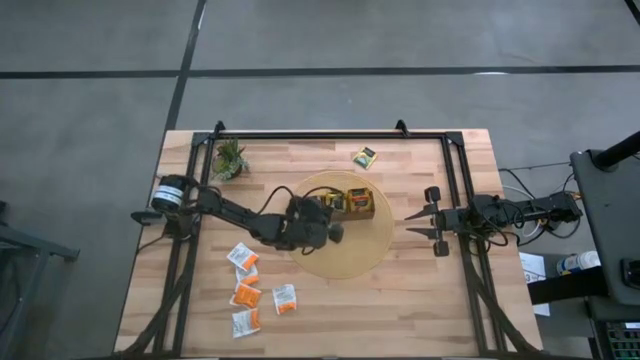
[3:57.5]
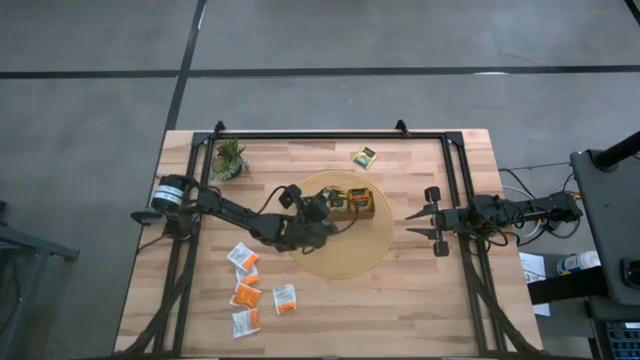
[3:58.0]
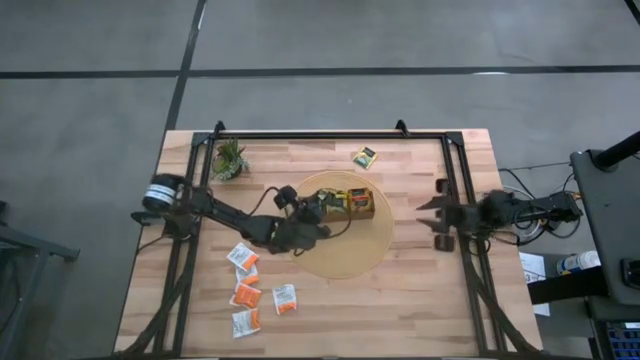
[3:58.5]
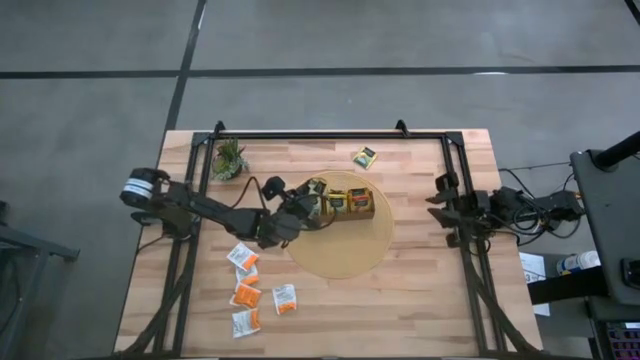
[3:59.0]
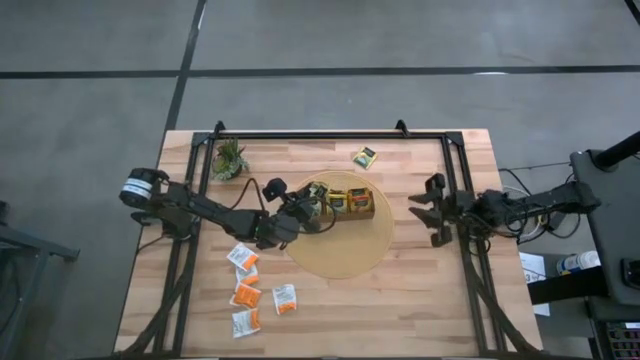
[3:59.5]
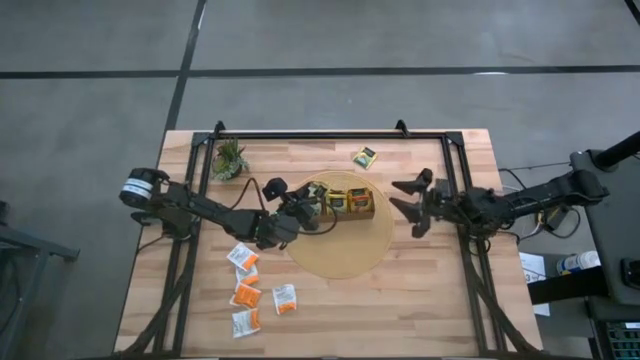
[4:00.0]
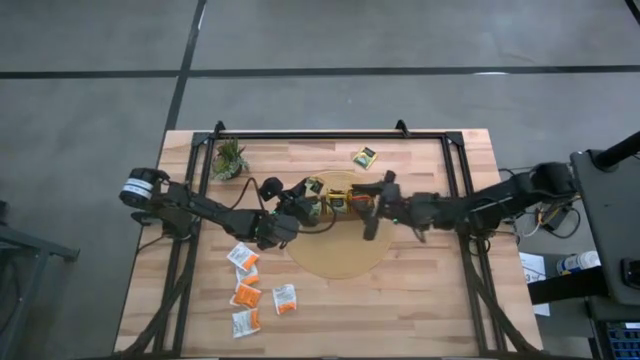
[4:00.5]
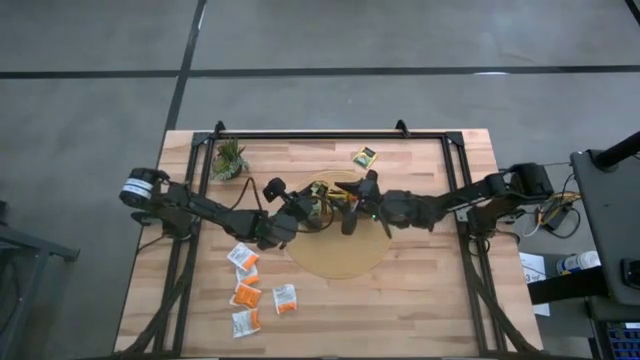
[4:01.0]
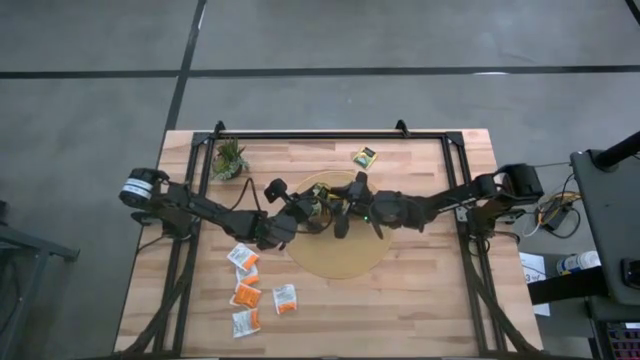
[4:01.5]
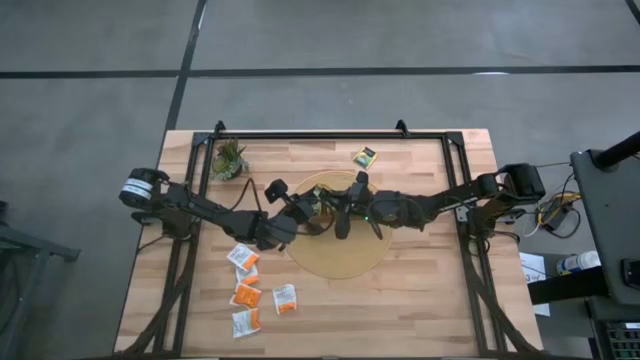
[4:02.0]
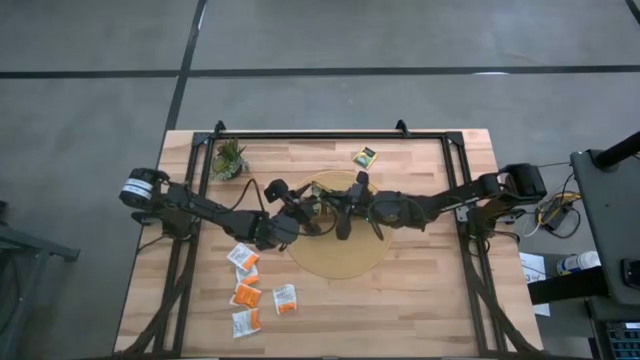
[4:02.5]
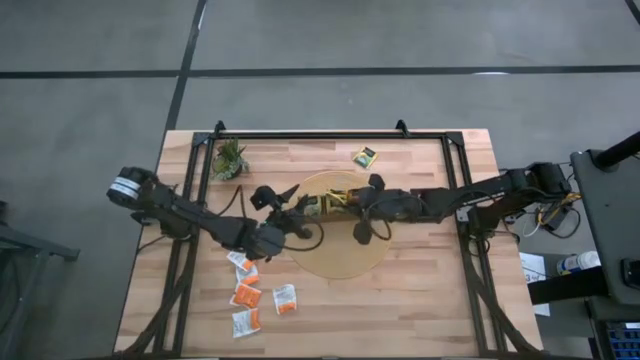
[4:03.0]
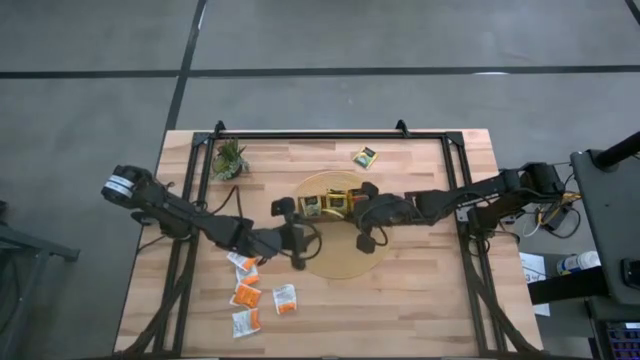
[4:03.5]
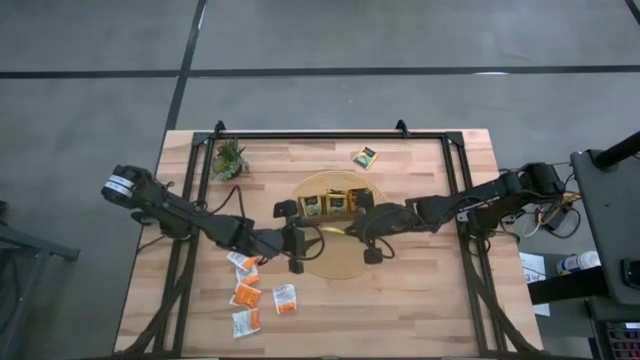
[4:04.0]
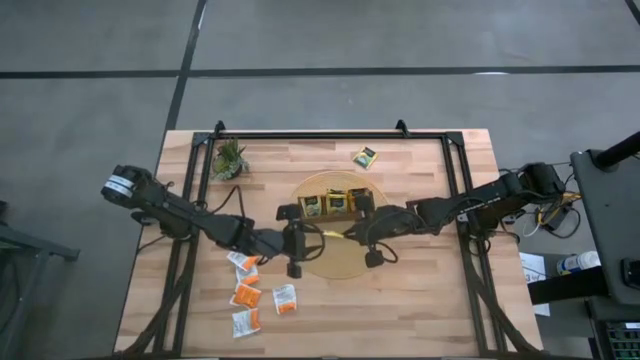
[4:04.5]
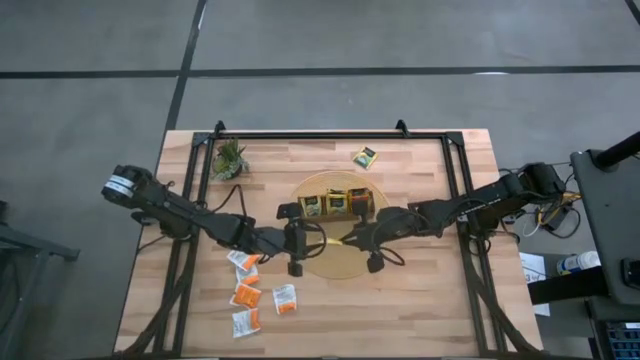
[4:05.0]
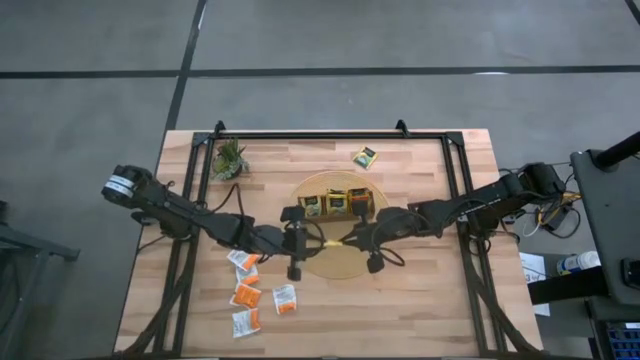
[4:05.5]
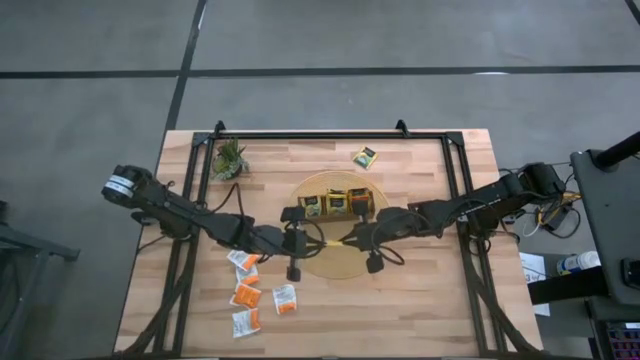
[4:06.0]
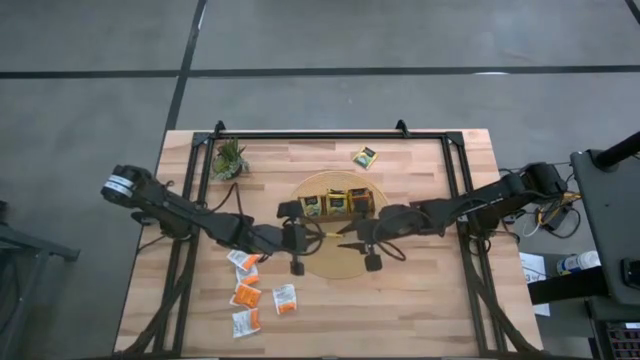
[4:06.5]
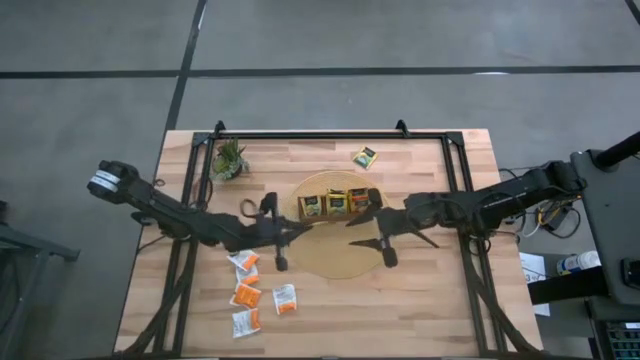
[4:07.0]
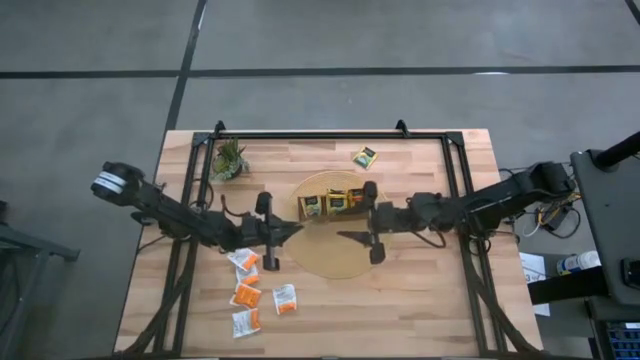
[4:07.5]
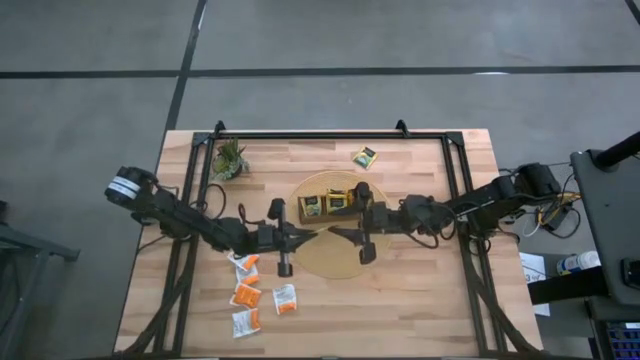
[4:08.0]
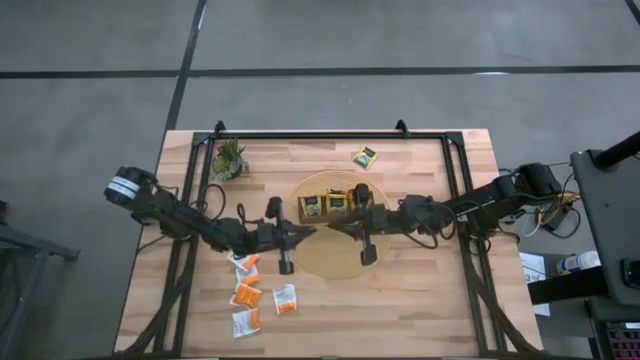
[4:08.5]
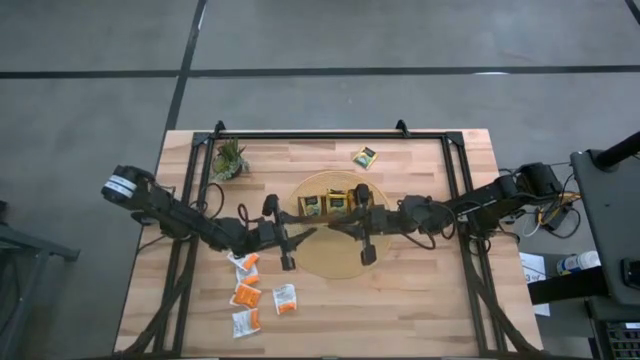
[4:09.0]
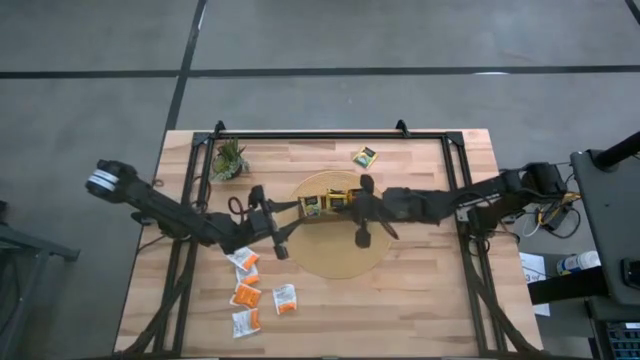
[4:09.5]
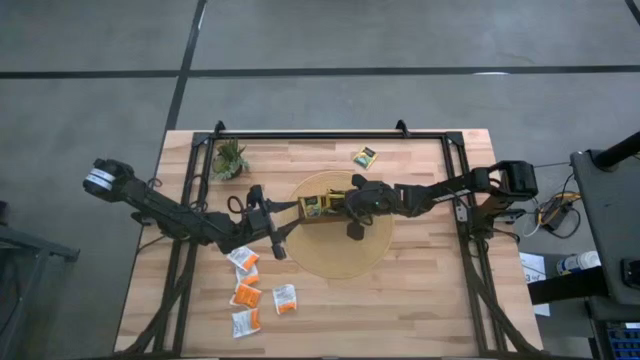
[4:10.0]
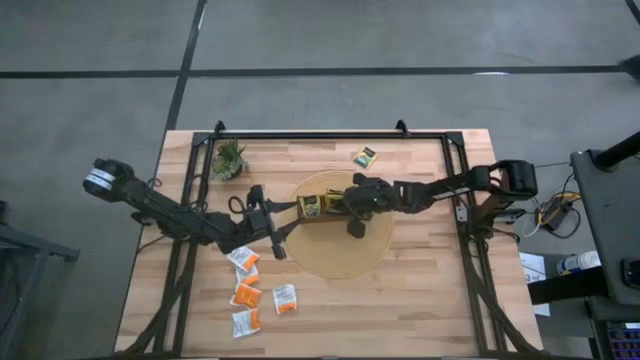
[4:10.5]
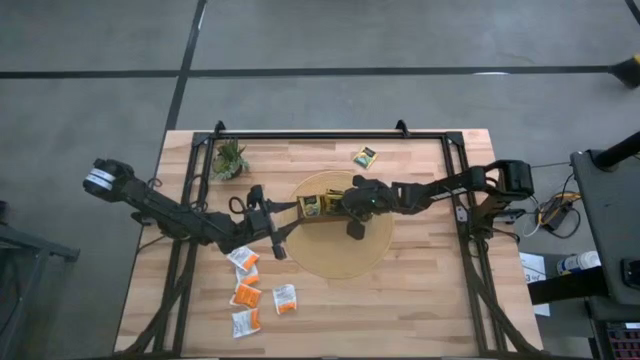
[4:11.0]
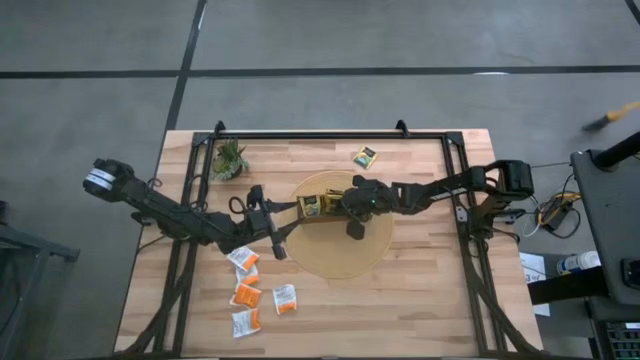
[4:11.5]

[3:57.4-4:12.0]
Task: Pick & Place Tea
Put the yellow tea bag into the middle section of the wooden organizer

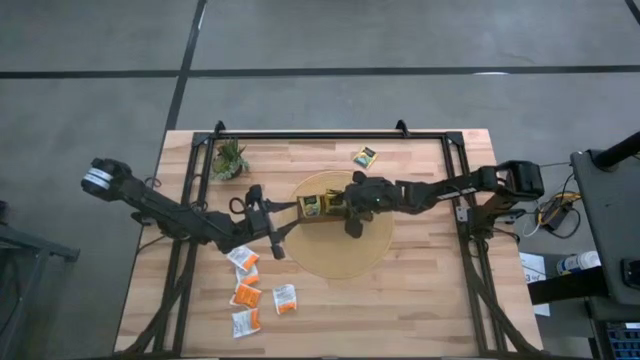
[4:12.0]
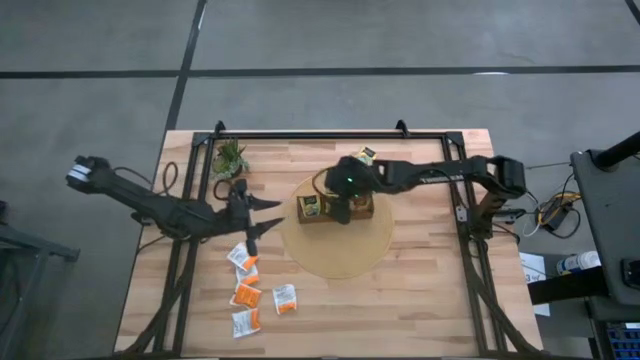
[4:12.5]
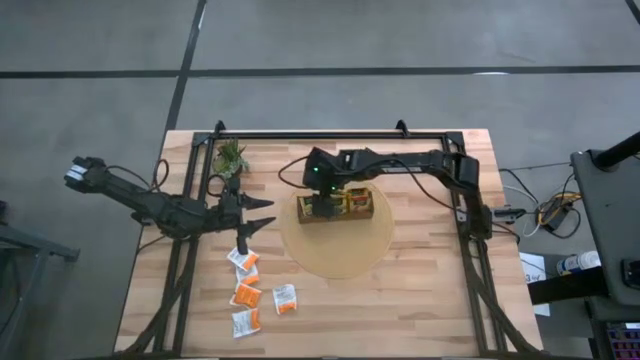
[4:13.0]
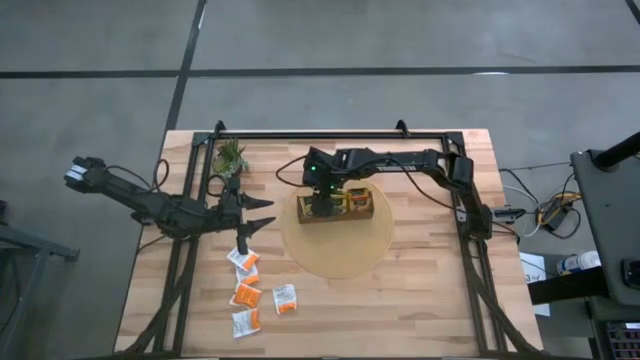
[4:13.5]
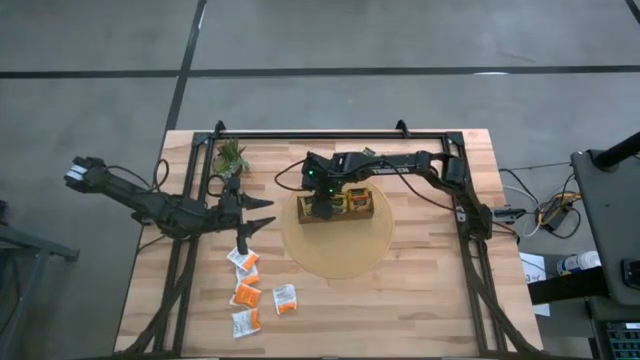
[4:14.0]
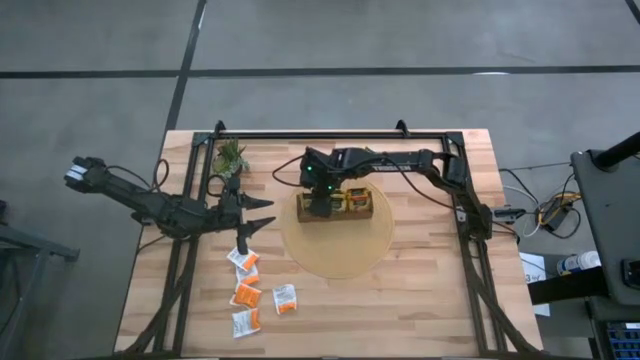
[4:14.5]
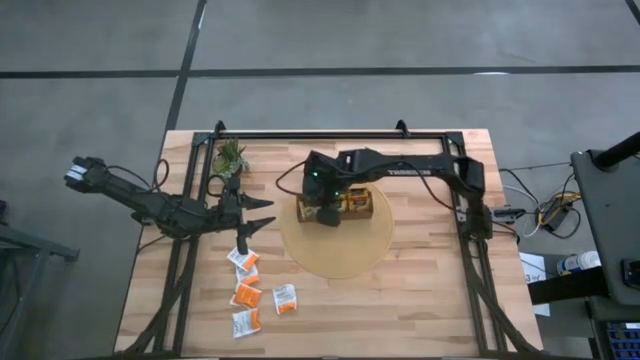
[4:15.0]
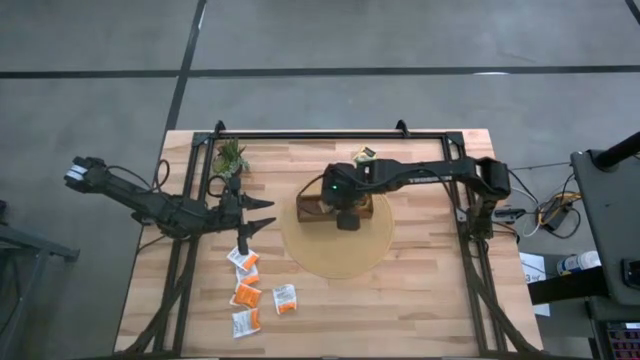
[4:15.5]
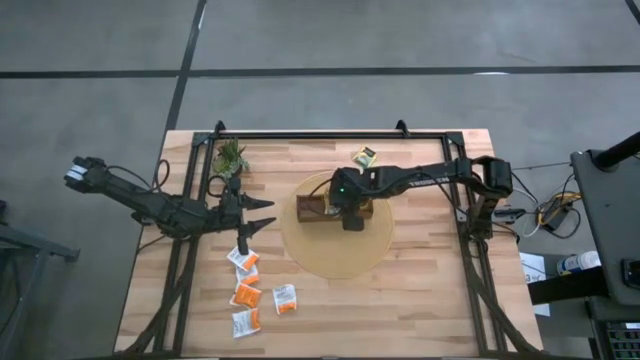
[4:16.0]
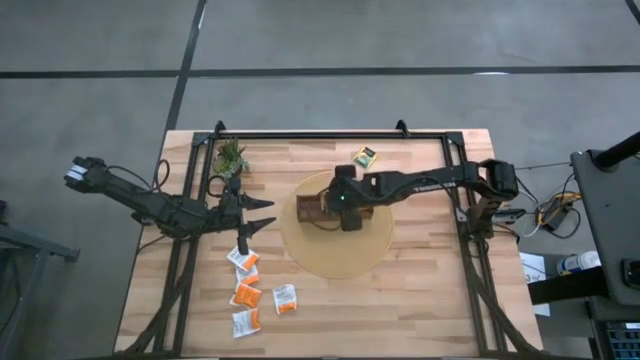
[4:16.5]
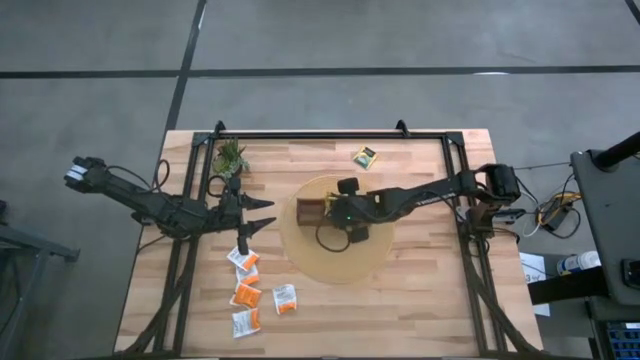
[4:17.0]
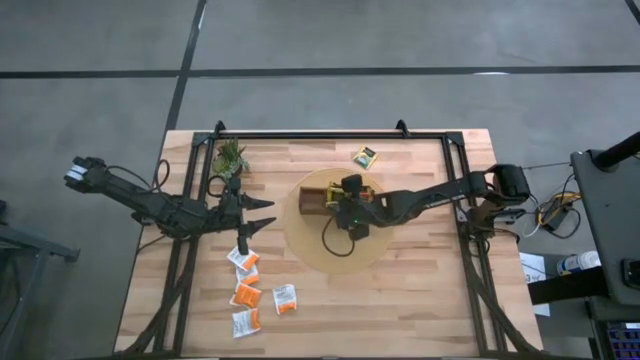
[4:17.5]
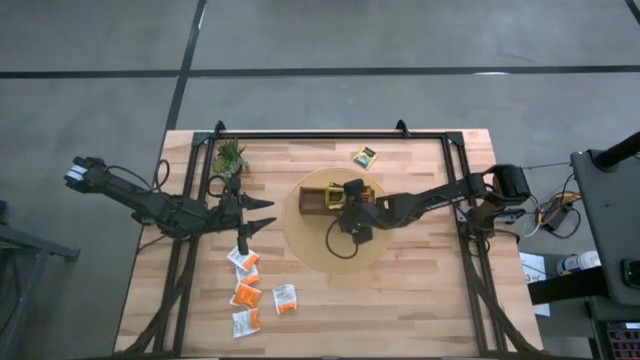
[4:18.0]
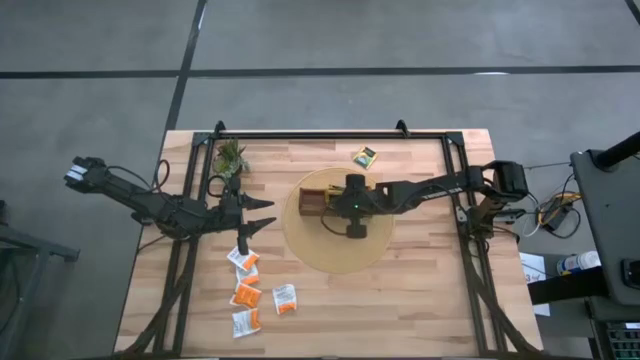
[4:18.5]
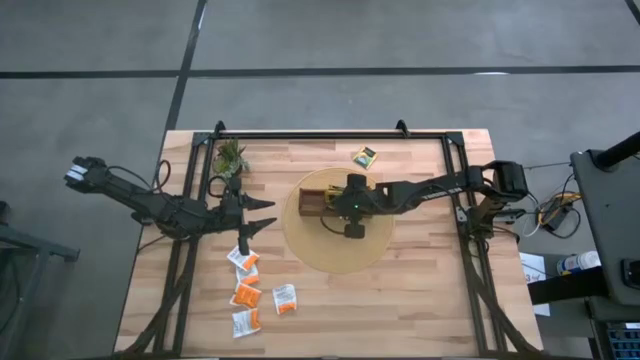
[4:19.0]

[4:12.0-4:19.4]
Put the yellow tea bag into the middle section of the wooden organizer

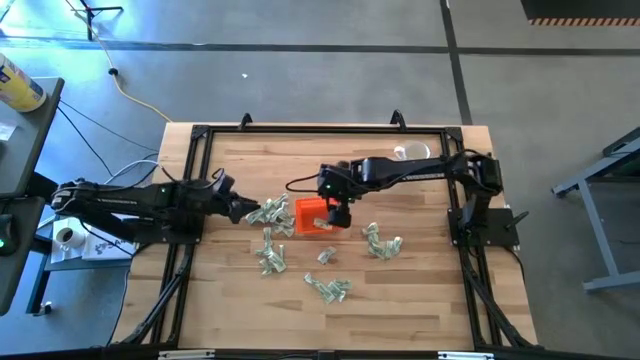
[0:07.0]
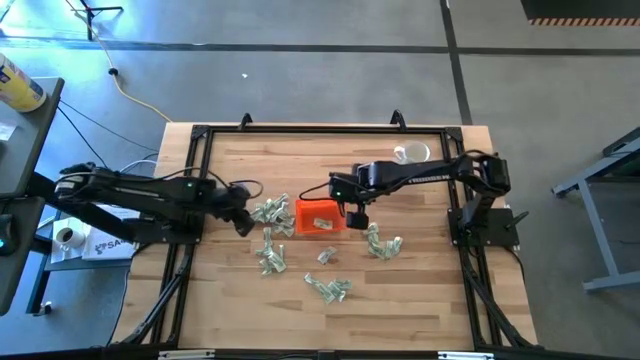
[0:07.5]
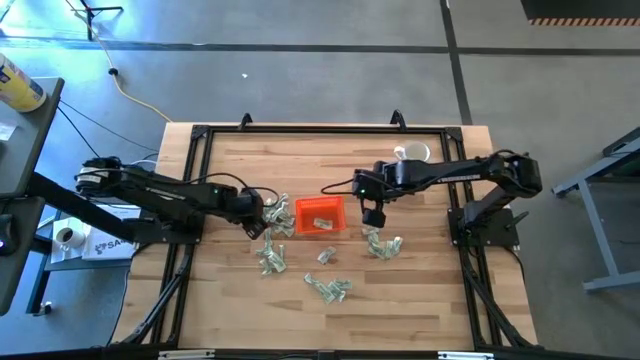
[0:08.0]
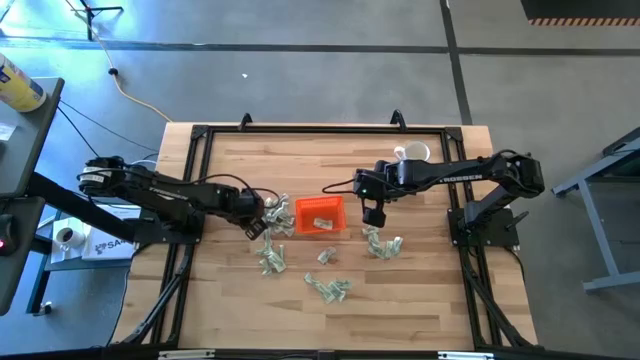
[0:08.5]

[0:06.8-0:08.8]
Task: Pick and place Stevia / Truvia into bins
Put the stevia packet into the orange bin
